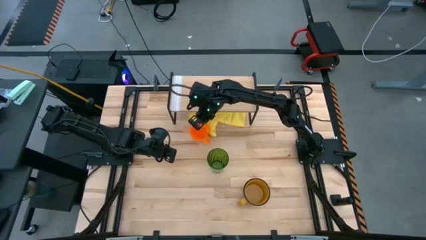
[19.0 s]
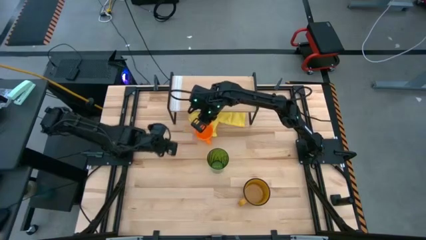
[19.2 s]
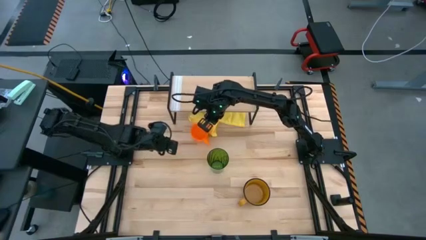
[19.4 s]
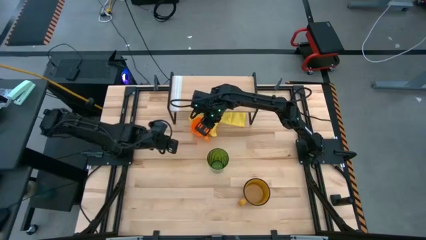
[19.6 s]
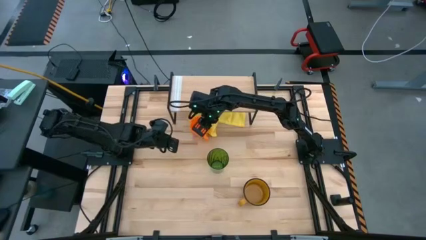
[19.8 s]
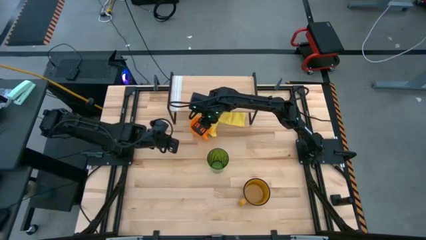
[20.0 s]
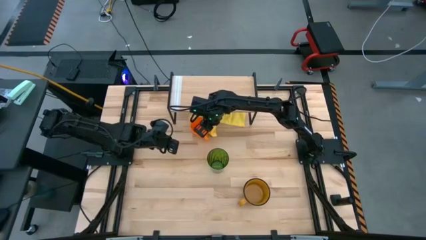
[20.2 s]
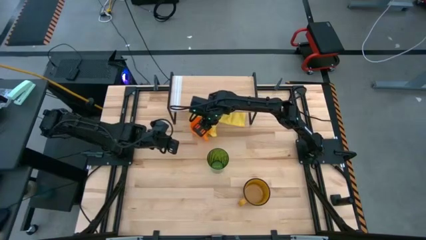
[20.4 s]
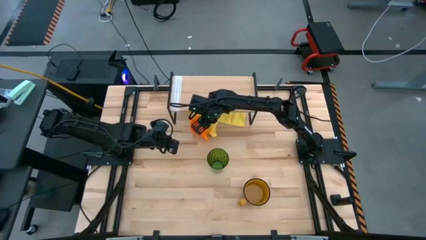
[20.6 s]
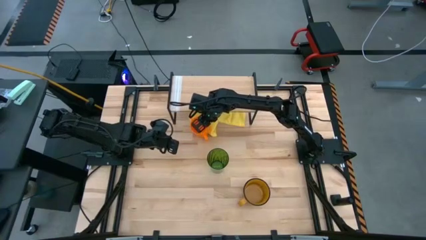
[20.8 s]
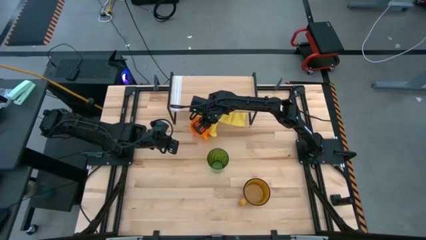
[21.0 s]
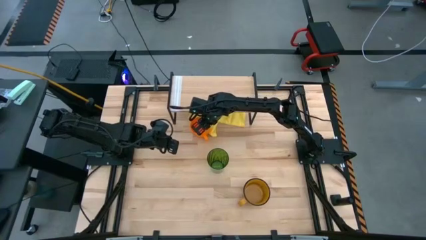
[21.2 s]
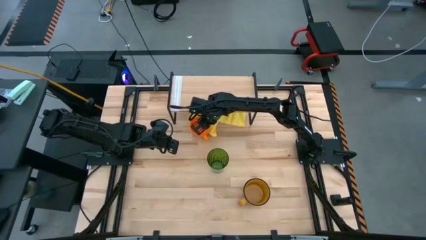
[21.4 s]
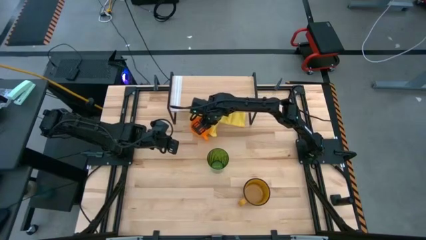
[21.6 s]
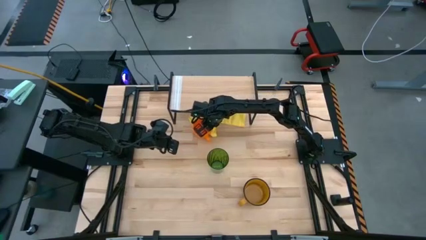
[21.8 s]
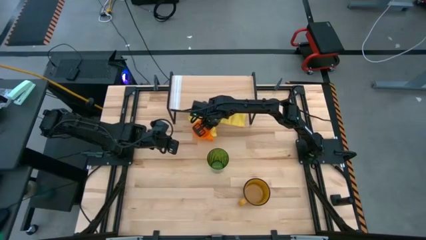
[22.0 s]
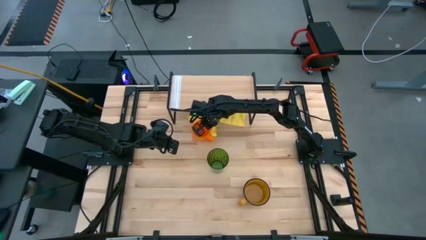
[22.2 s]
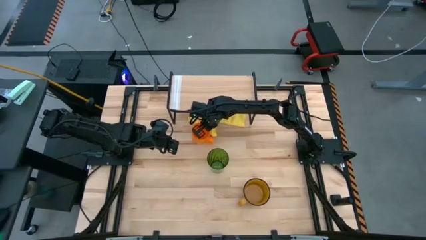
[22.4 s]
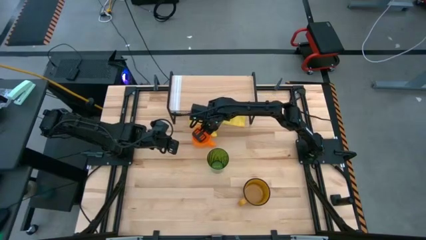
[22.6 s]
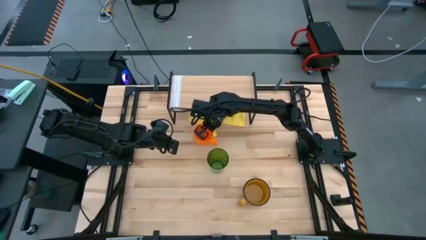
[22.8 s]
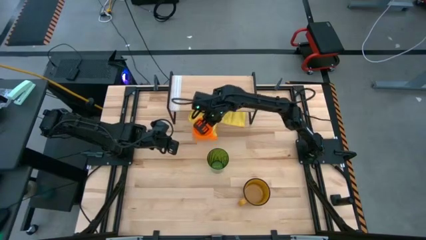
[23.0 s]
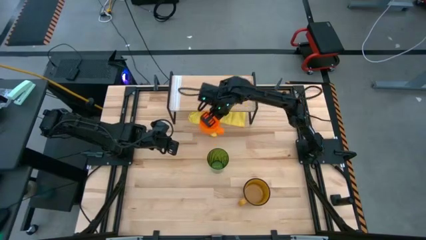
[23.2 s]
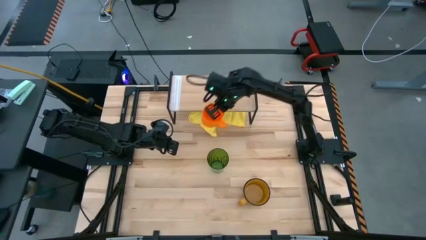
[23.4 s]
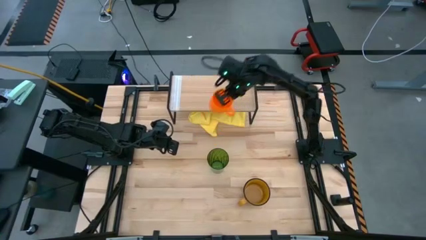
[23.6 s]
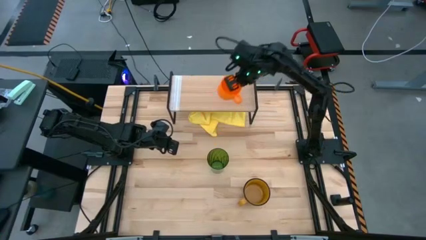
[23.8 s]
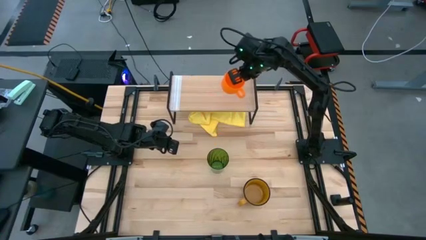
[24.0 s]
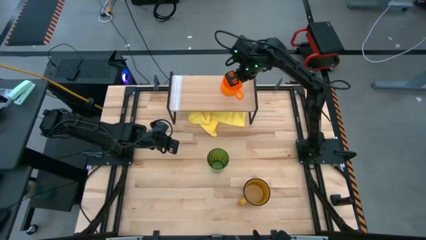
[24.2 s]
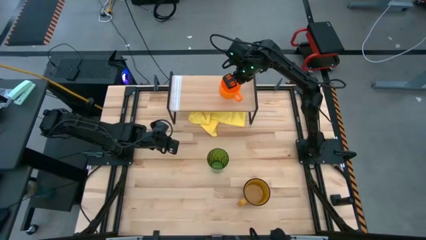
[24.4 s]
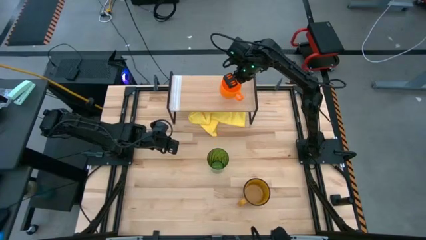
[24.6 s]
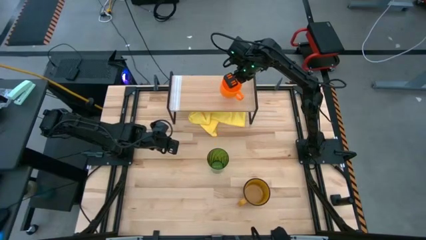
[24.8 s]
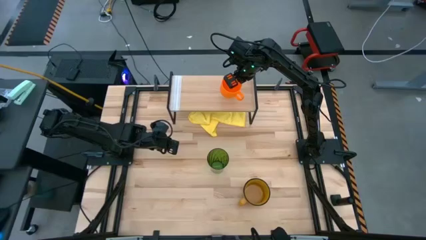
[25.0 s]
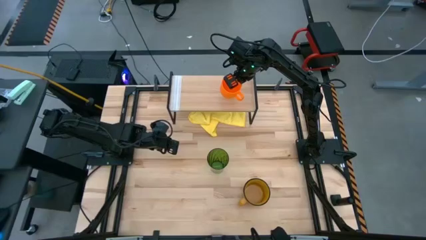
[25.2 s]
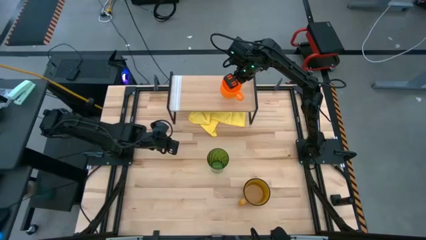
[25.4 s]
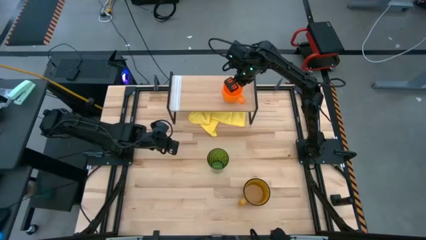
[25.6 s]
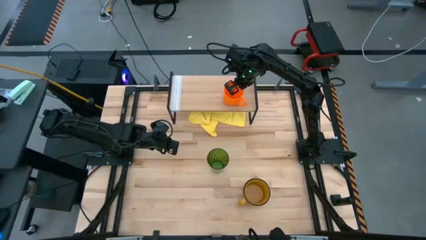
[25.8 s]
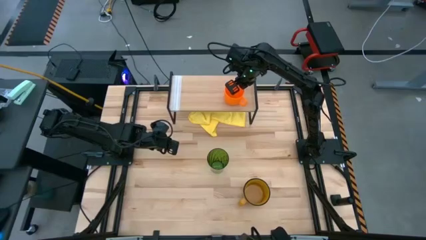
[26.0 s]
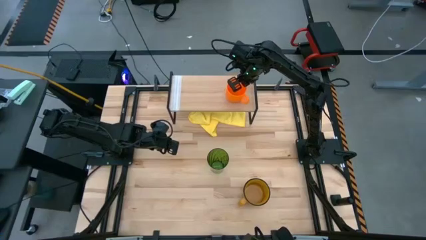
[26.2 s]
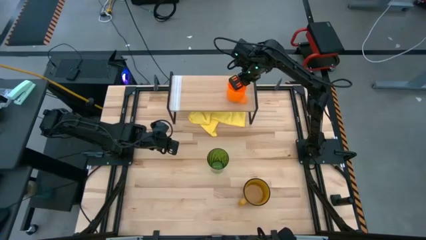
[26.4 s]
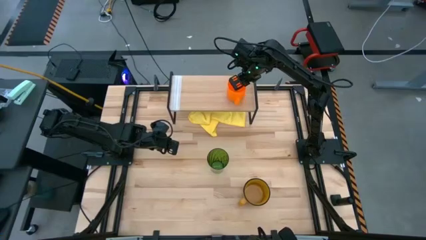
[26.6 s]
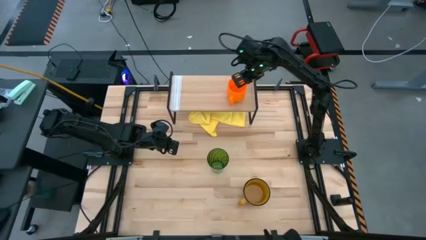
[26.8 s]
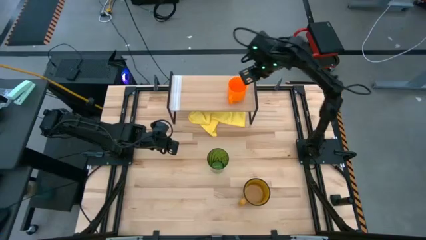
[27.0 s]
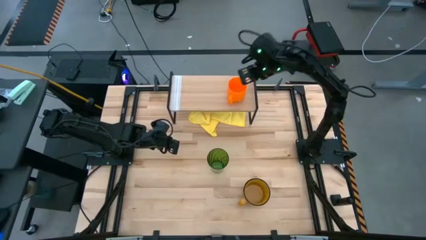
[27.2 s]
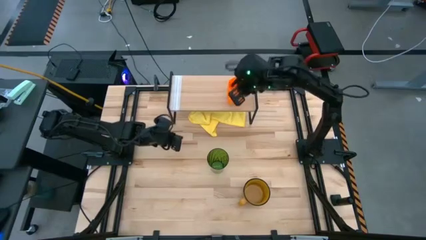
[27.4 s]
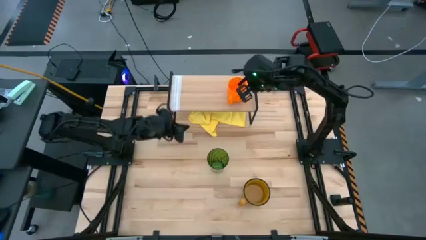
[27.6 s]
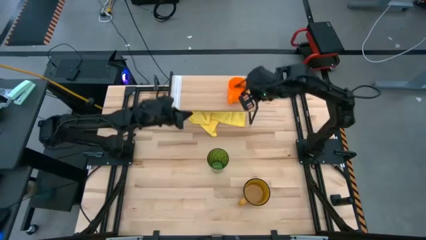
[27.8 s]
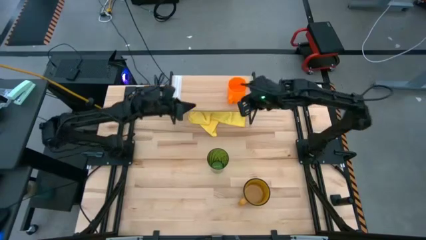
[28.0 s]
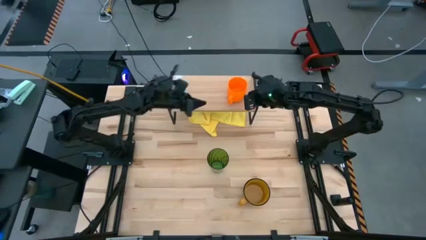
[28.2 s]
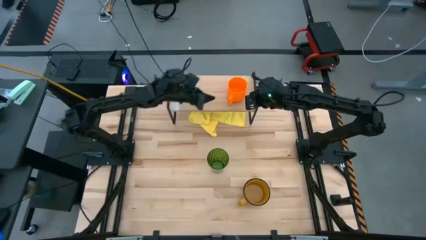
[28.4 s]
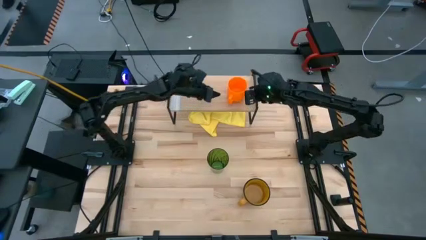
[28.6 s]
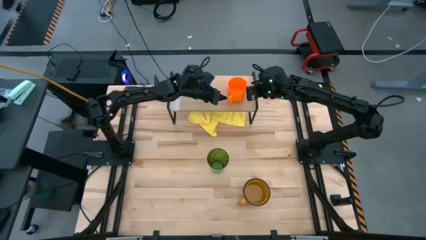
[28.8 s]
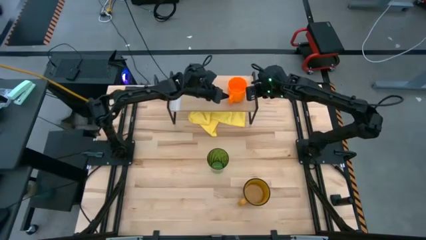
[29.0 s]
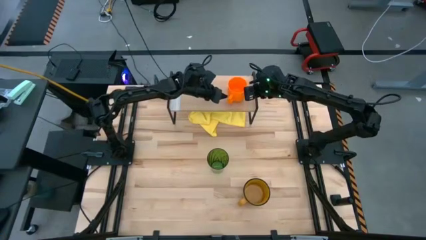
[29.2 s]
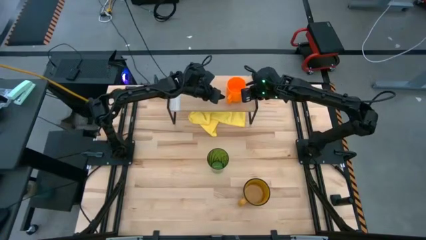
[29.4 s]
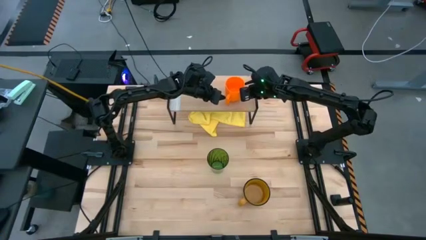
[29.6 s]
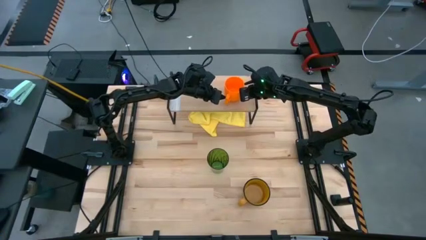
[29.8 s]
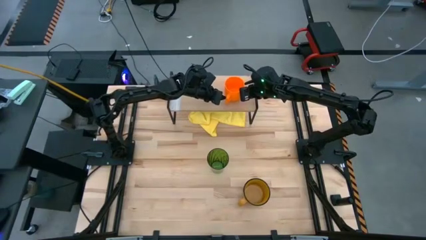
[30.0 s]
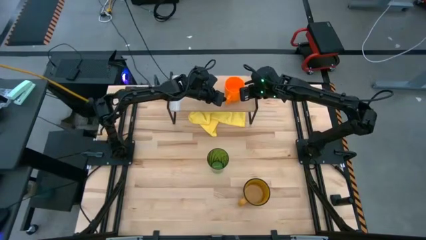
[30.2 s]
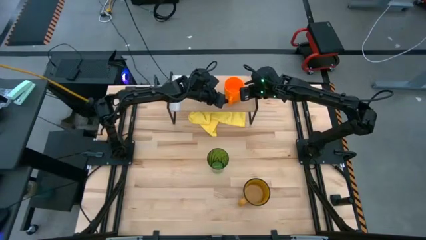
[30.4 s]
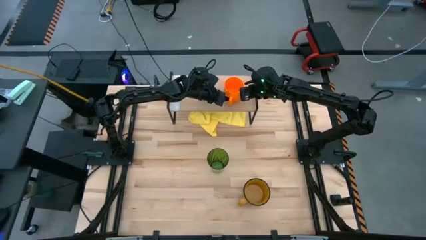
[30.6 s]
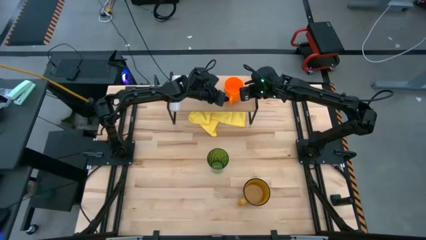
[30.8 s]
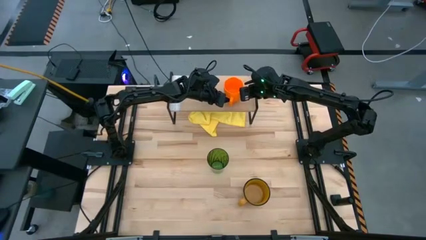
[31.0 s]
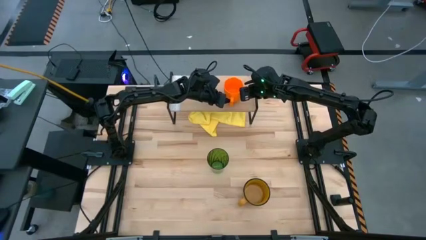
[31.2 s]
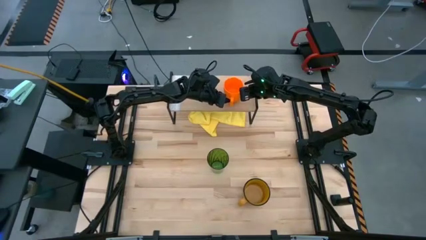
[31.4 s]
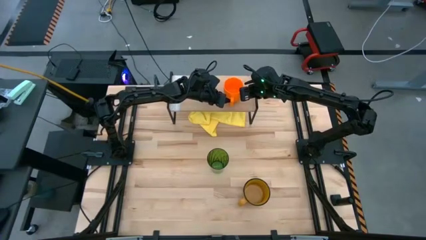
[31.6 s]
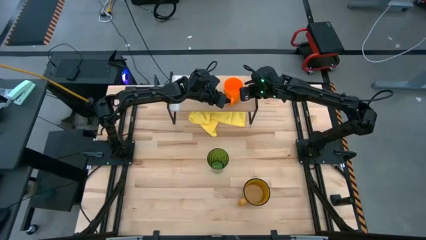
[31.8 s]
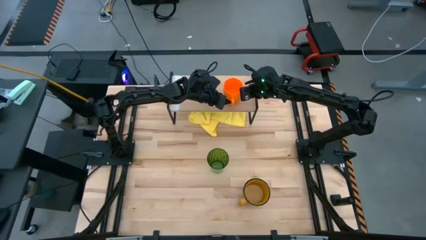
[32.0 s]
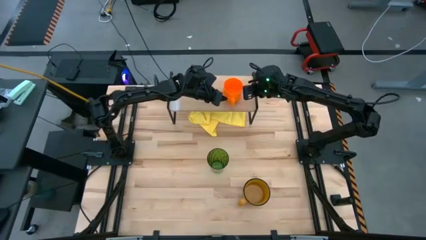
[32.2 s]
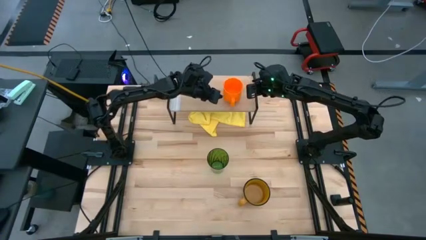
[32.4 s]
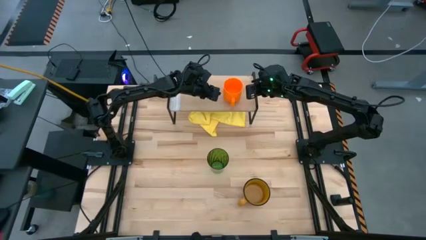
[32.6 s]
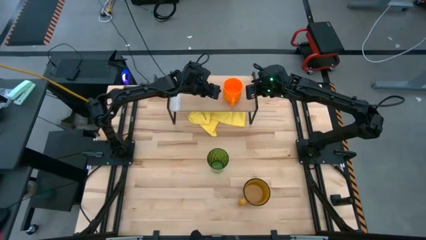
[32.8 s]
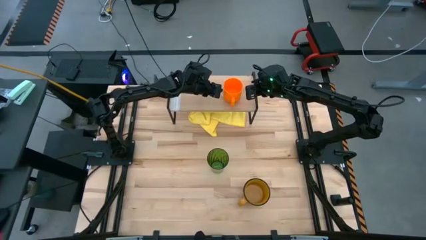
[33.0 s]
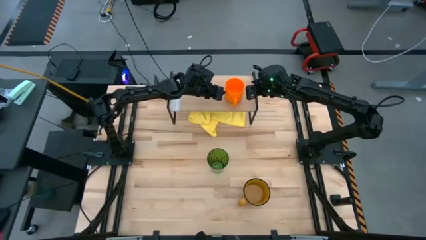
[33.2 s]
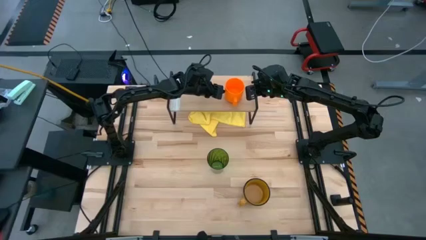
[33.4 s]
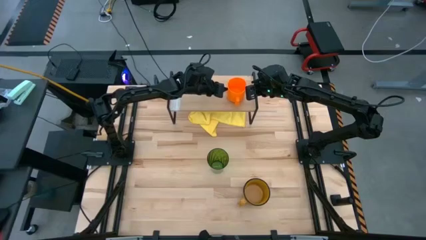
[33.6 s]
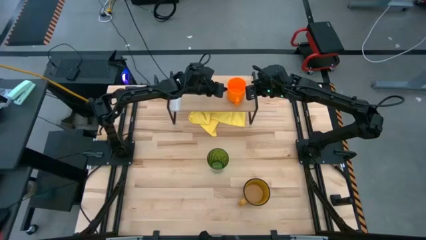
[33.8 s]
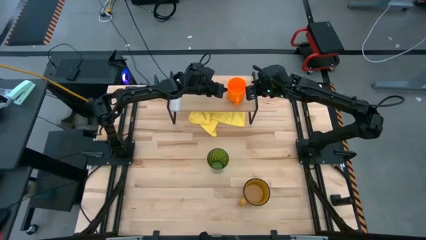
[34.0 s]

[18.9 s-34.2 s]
Task: Stack small to large cups/mugs on shelf
Put the orange mug on the shelf

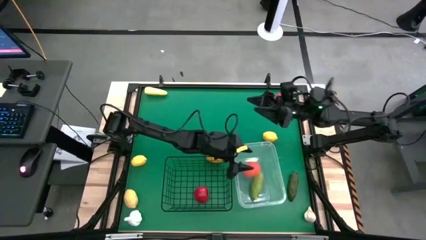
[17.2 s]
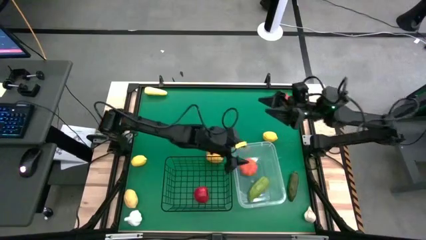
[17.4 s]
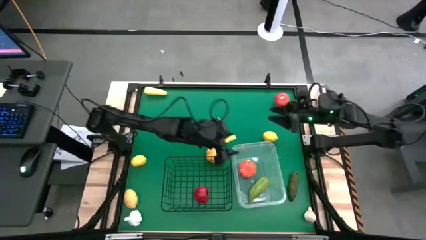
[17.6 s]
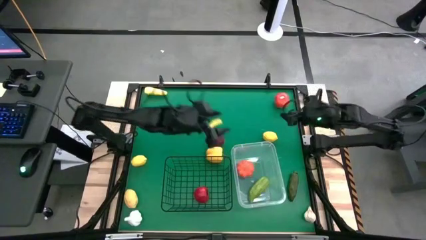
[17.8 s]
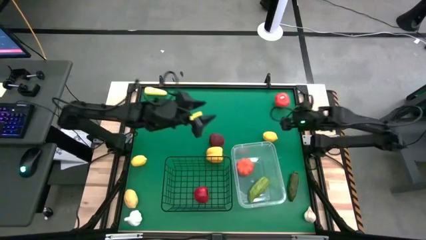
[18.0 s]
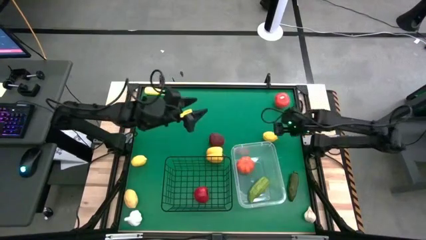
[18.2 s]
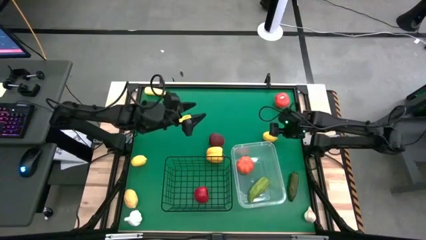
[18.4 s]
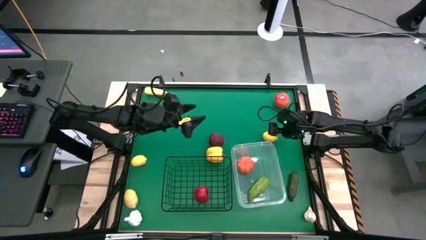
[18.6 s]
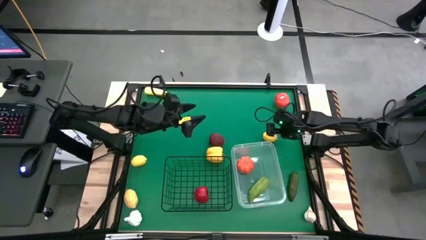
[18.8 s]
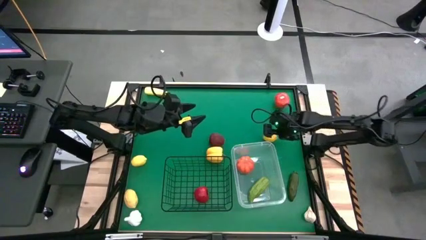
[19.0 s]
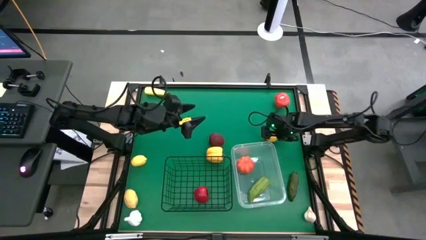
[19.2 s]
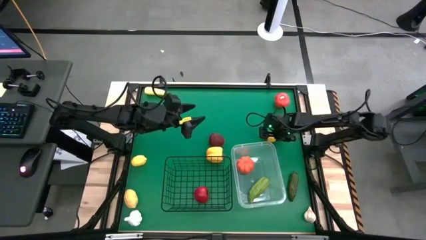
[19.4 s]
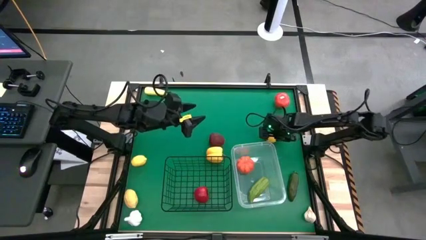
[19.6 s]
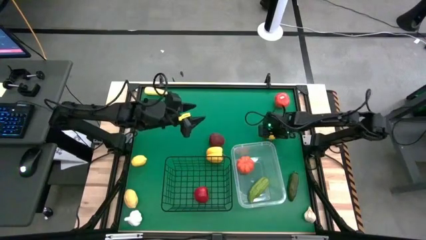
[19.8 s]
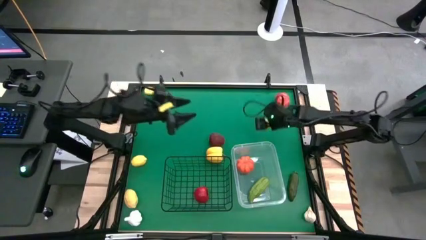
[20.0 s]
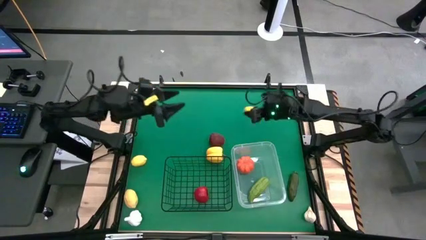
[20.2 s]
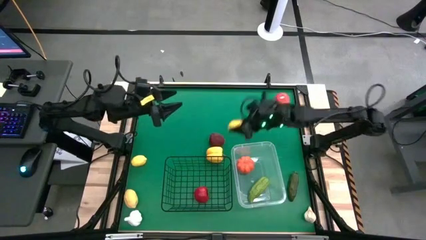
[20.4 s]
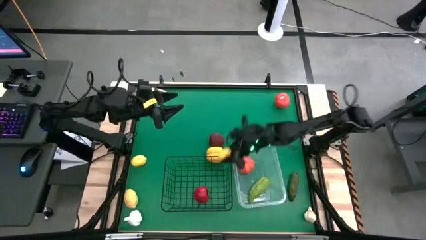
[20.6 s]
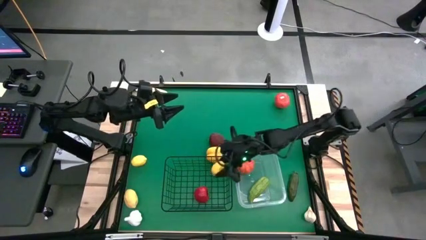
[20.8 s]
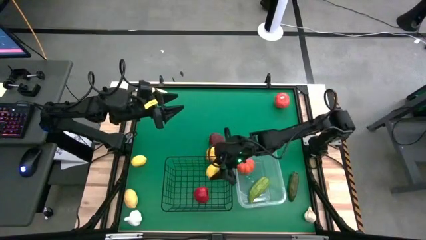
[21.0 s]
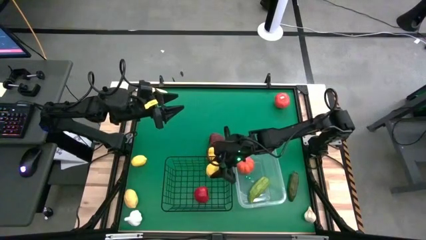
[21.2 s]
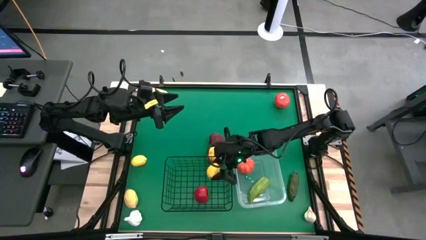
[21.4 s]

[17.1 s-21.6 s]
Task: Sort produce into baskets
Put the right lemon into the wire basket
